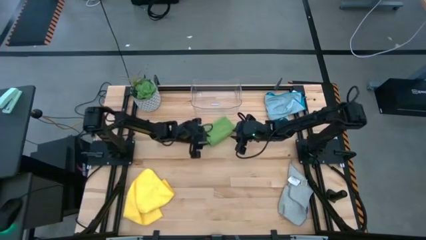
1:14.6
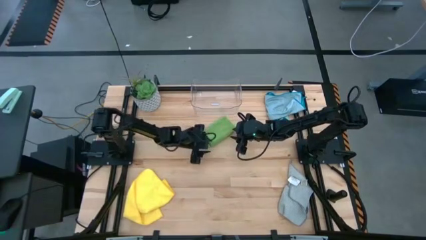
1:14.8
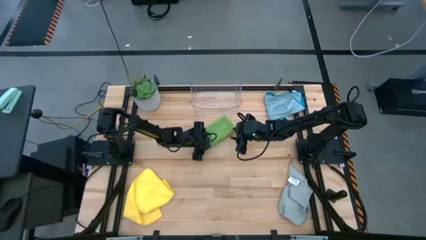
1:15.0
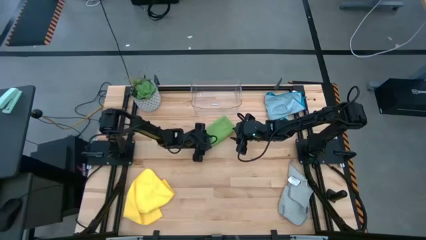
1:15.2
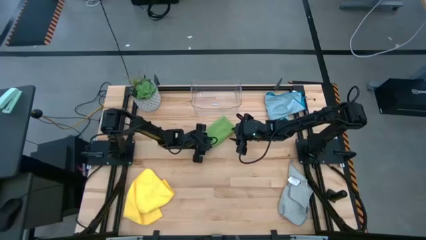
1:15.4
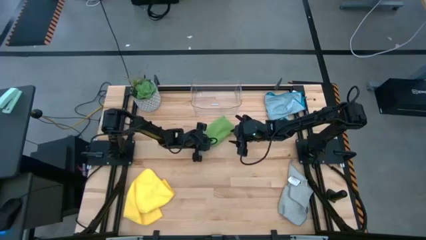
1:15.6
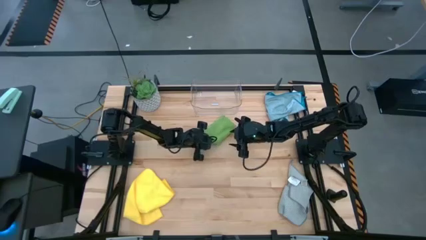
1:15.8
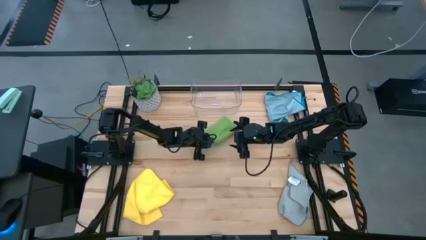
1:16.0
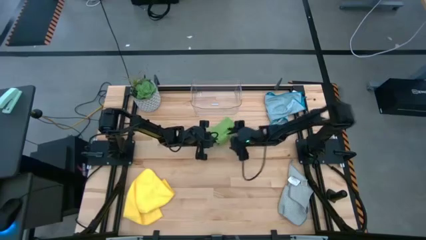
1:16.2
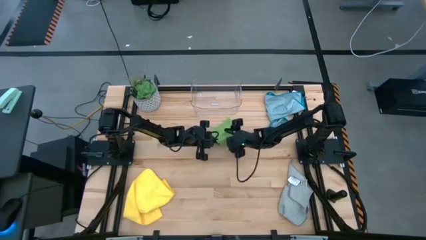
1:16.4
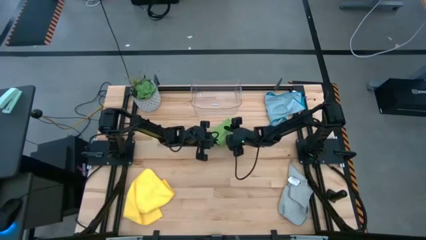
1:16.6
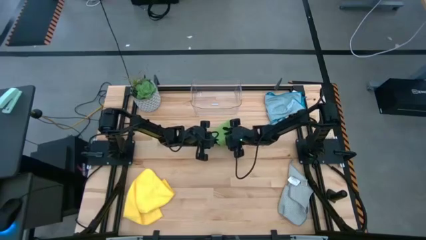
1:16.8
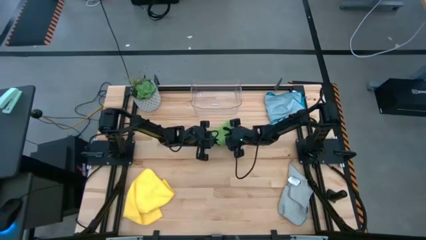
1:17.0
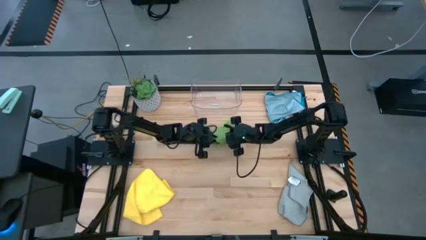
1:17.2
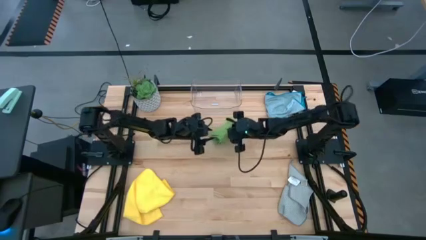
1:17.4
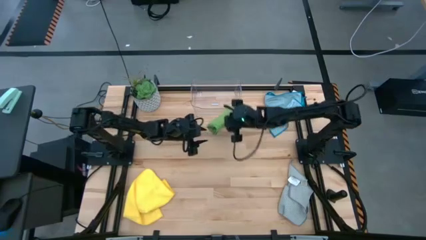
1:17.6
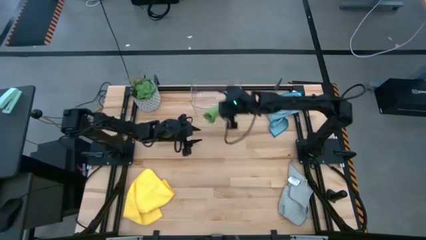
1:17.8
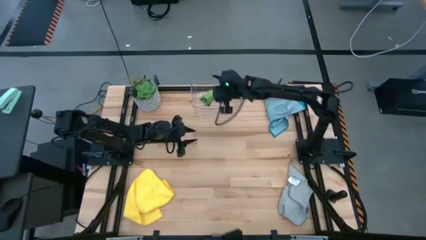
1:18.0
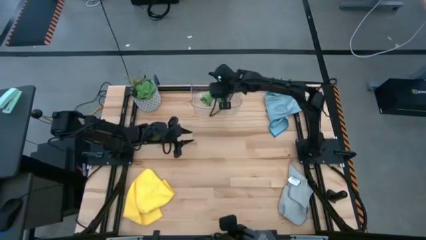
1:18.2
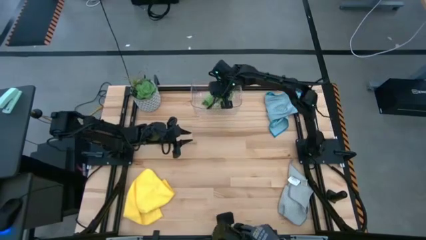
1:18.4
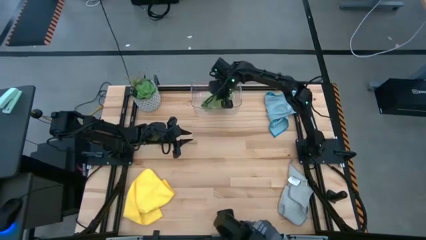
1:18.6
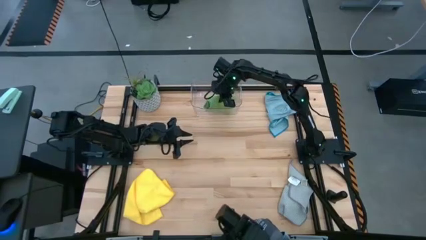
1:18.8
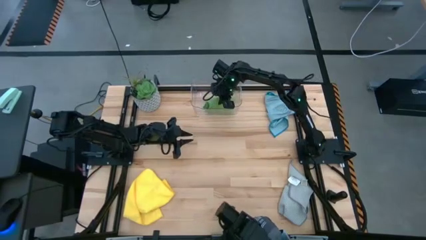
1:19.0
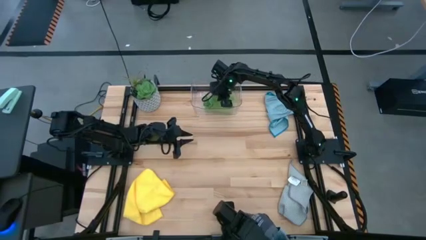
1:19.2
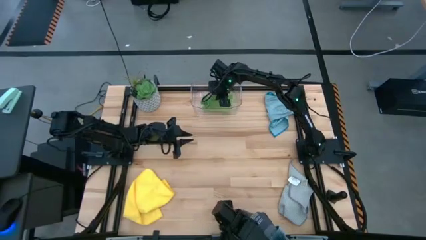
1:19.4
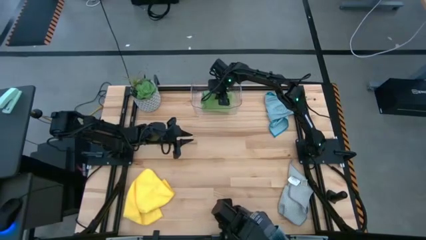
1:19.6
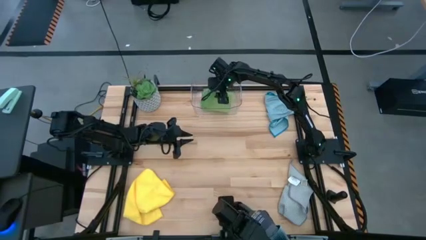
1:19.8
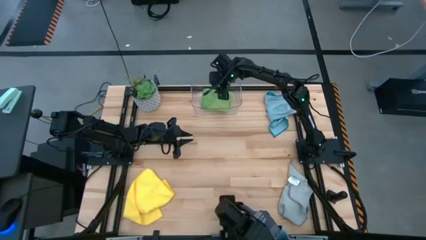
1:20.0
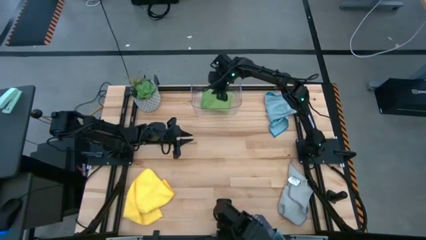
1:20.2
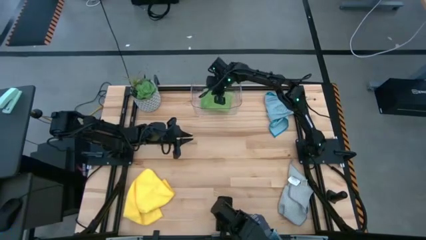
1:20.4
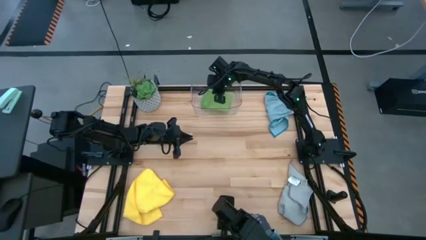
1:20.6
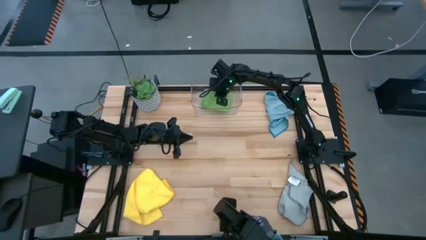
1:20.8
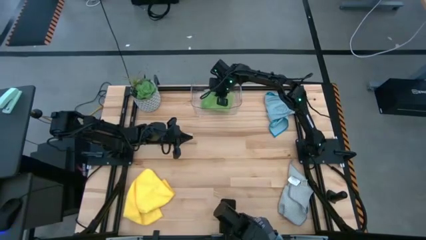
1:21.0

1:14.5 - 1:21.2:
Task: Fold microfiber towels
Put the folded green microfiber cloth into the transparent bin

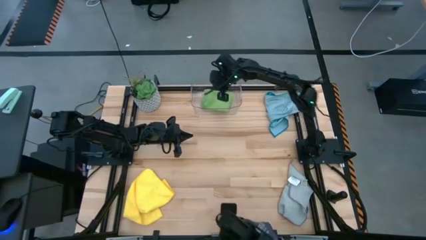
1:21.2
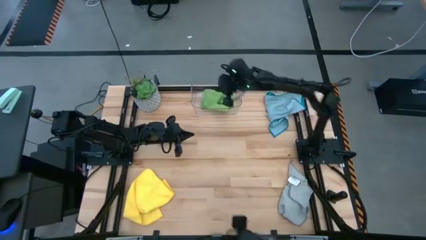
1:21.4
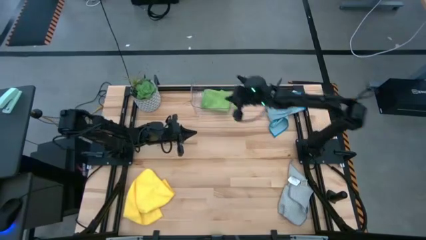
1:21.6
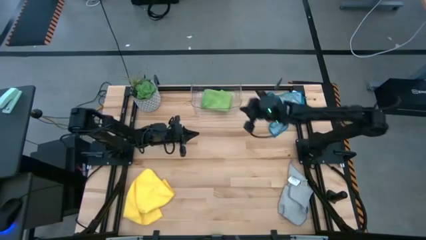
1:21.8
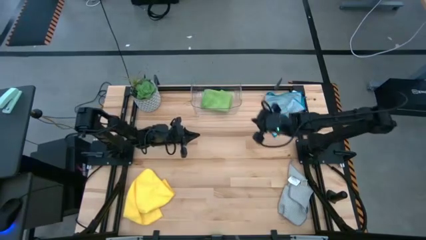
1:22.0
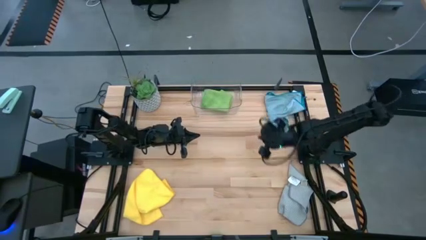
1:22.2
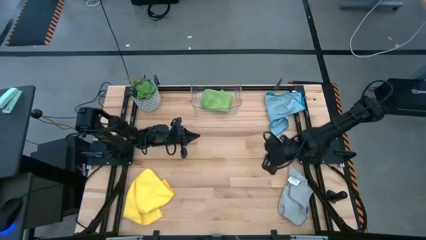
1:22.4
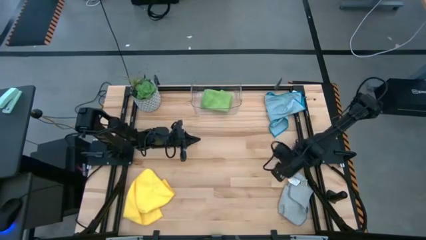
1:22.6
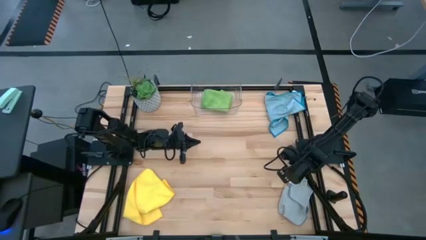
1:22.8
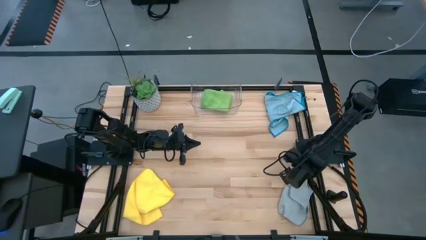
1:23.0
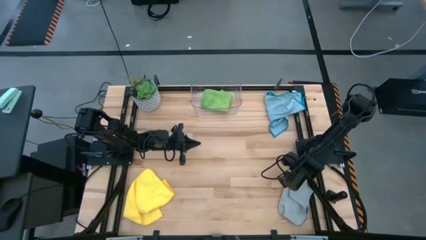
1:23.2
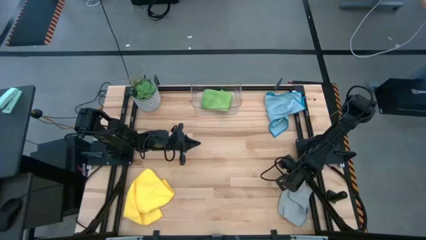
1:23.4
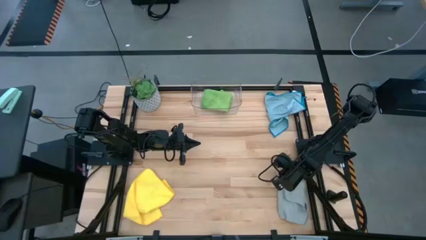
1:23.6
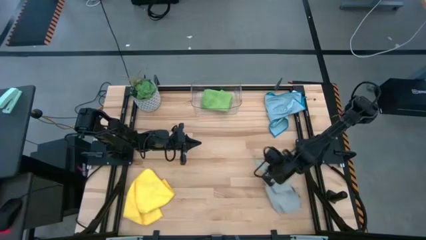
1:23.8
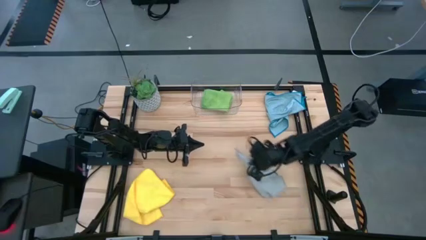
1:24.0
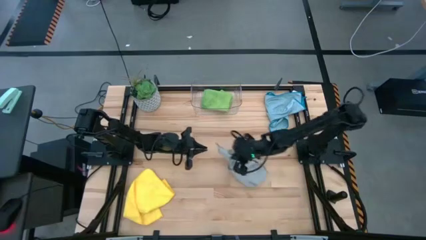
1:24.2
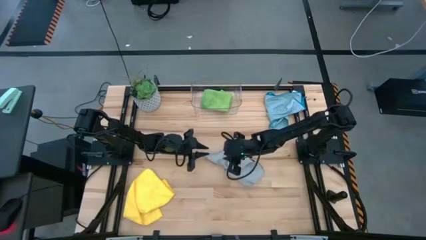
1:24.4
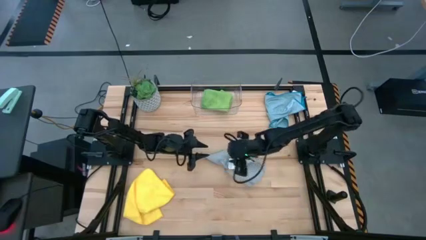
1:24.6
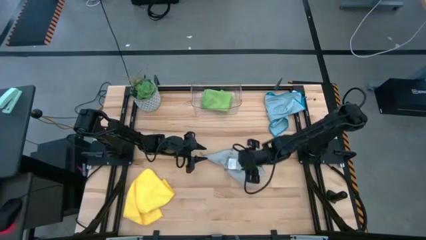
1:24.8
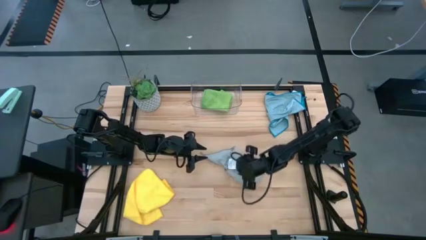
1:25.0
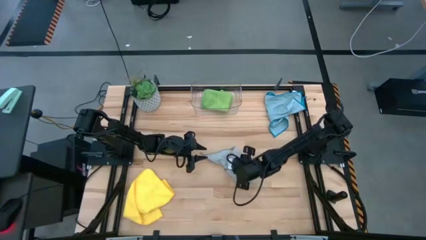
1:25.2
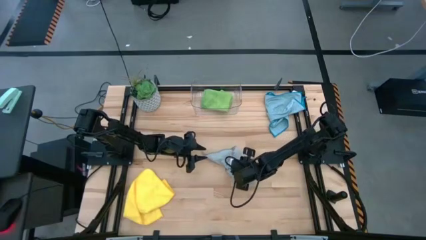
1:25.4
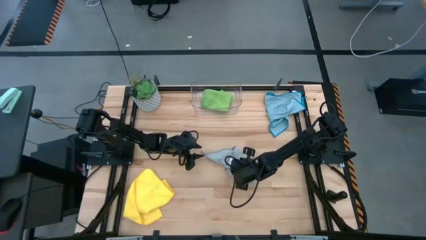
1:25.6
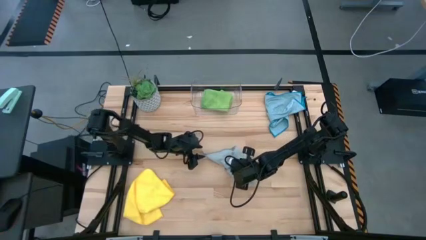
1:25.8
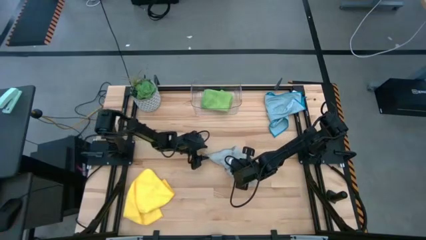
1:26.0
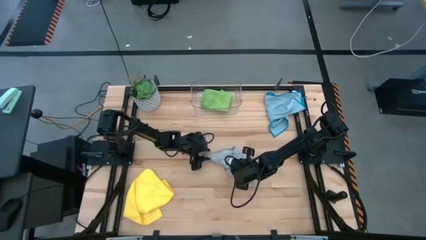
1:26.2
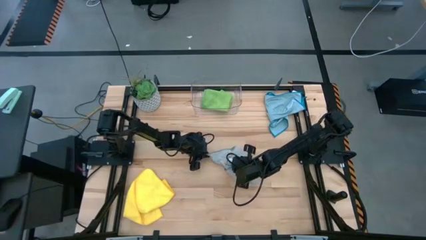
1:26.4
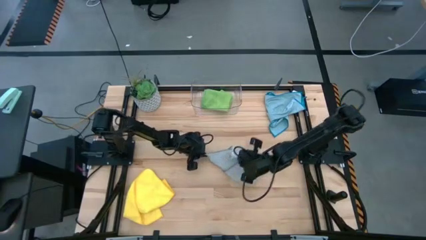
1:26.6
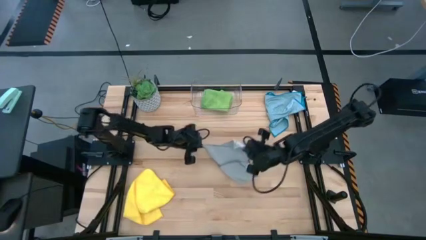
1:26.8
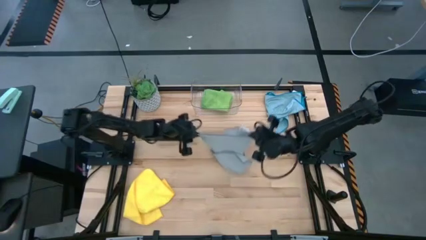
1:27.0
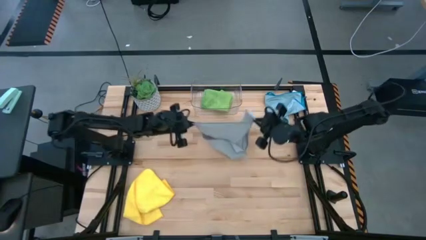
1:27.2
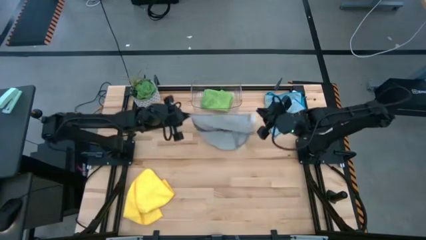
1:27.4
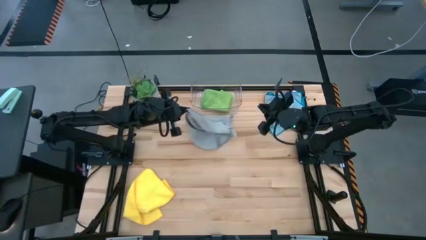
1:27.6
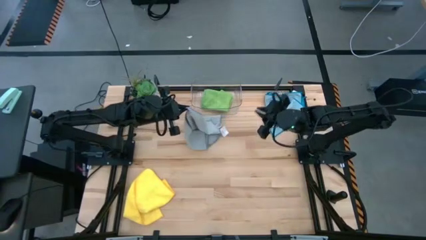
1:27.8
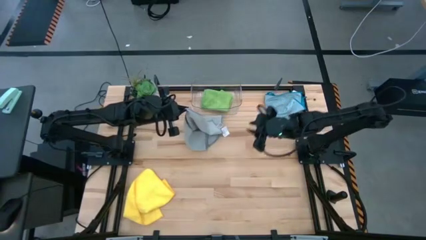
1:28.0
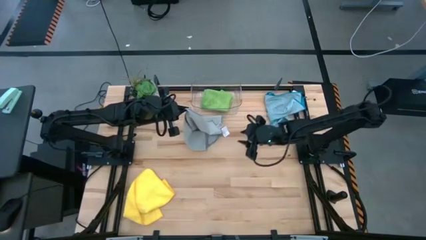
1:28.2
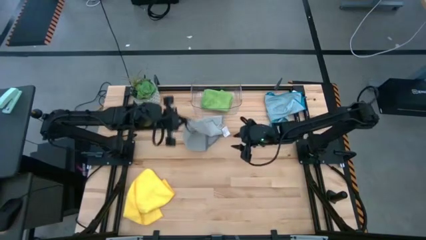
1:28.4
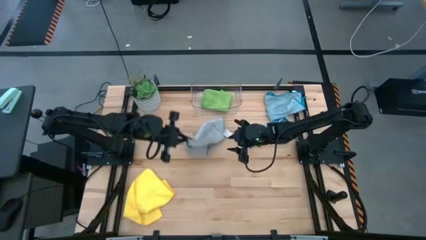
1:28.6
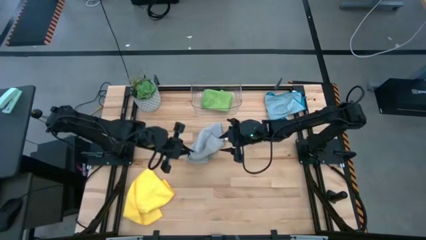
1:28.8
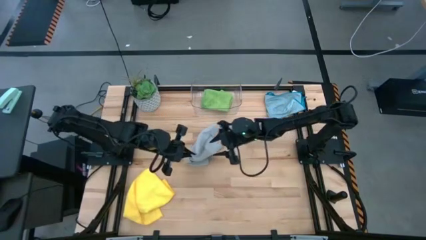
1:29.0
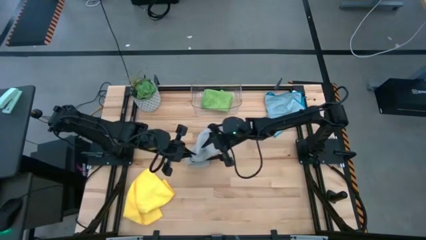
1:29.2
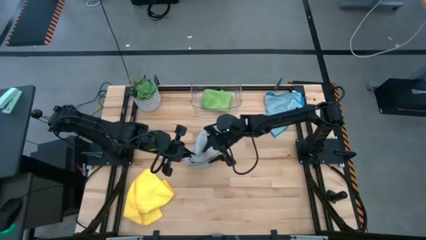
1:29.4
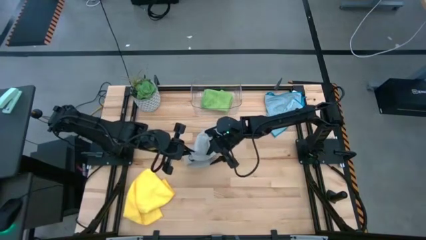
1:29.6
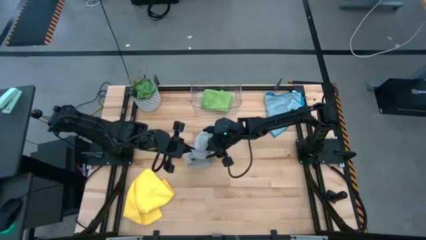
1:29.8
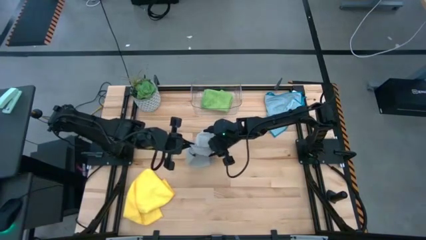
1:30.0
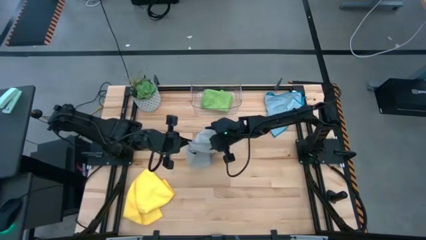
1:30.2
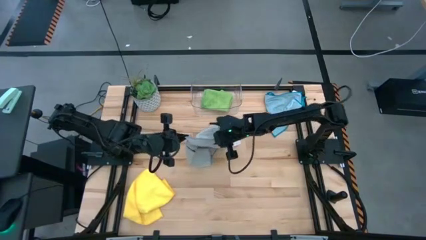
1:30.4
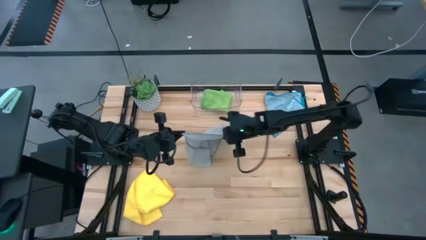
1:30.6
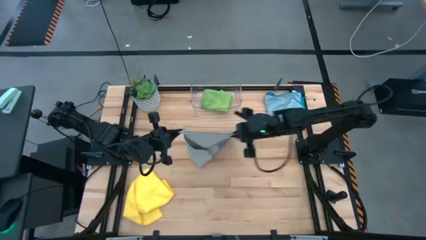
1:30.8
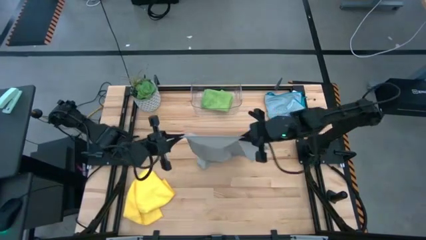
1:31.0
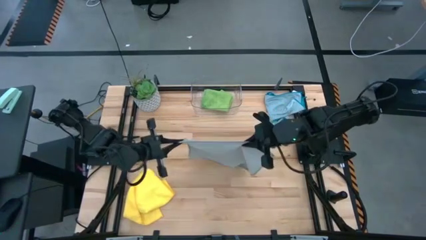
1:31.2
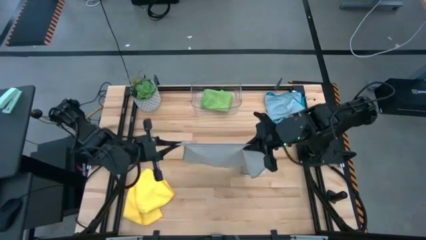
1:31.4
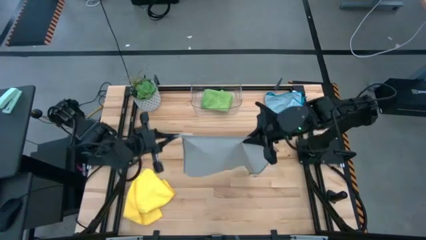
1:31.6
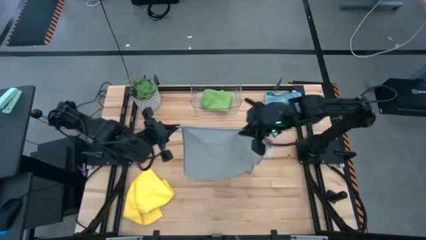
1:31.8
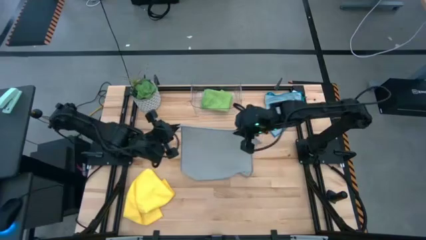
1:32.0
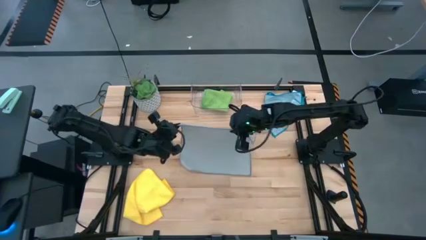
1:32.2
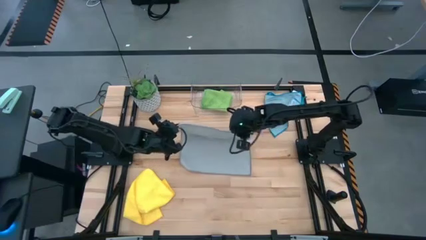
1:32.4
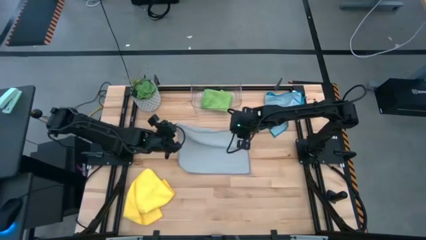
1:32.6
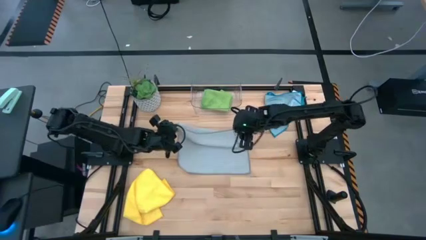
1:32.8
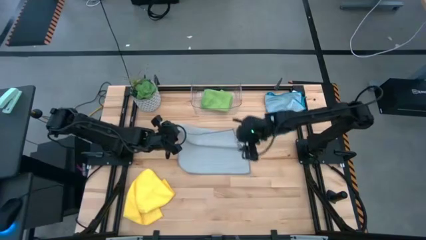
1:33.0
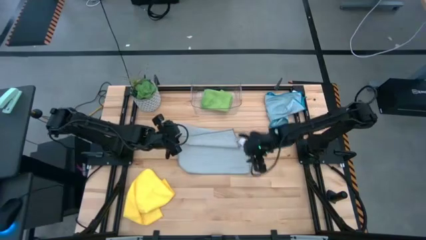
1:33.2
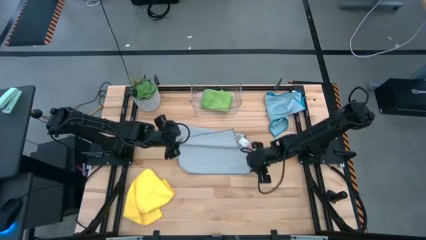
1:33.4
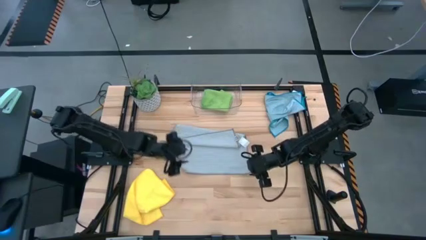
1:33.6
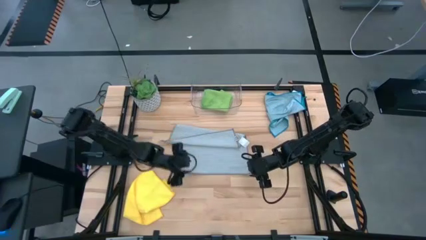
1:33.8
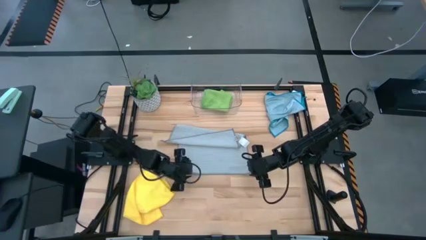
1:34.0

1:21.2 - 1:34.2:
Fold the gray microfiber cloth
